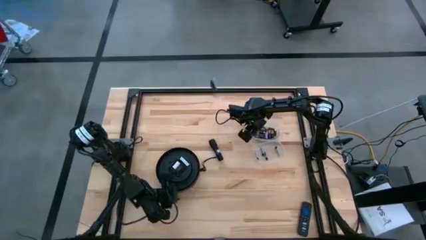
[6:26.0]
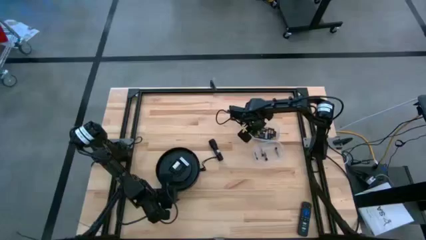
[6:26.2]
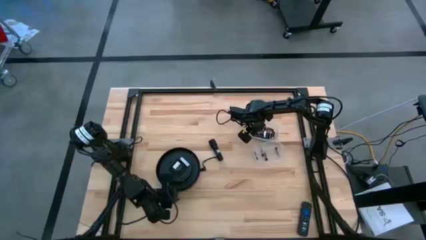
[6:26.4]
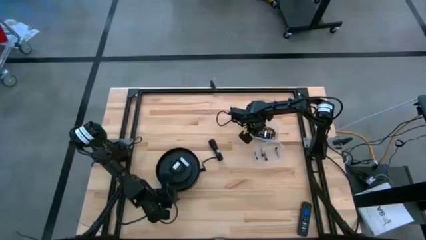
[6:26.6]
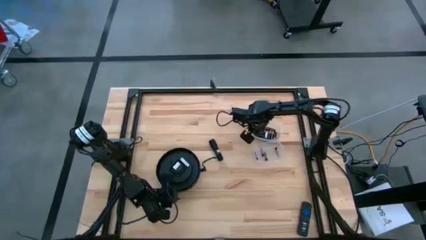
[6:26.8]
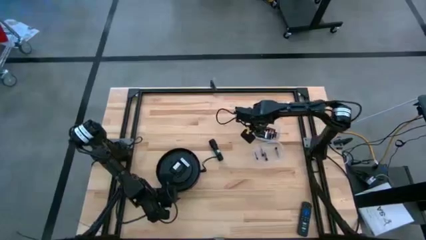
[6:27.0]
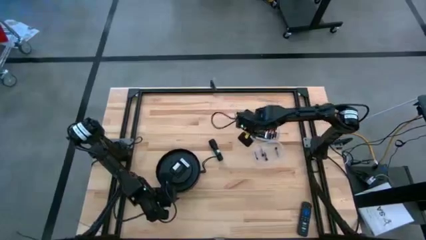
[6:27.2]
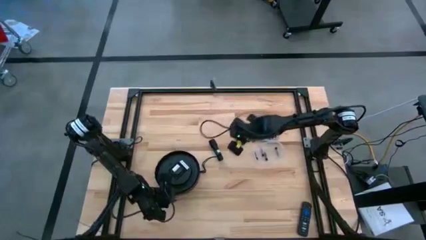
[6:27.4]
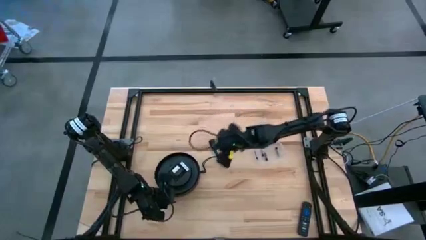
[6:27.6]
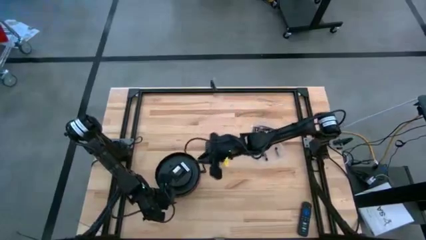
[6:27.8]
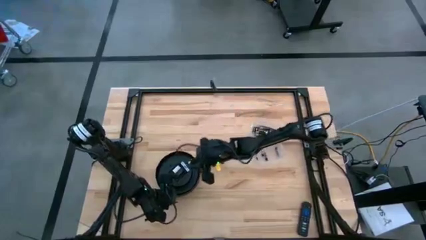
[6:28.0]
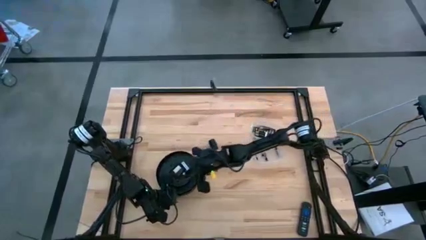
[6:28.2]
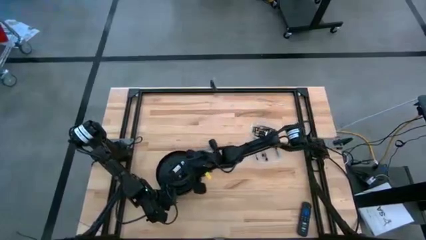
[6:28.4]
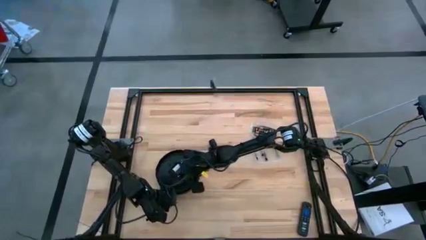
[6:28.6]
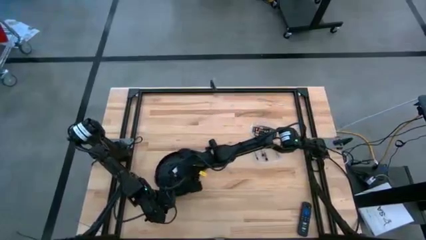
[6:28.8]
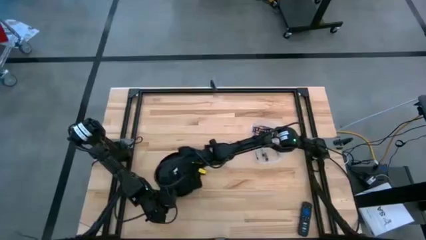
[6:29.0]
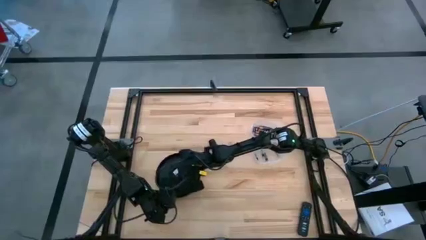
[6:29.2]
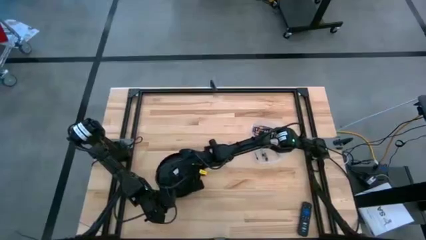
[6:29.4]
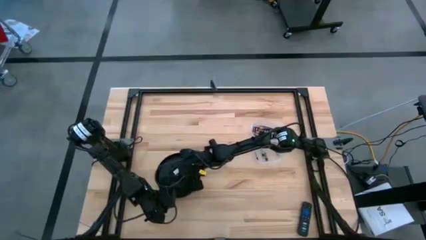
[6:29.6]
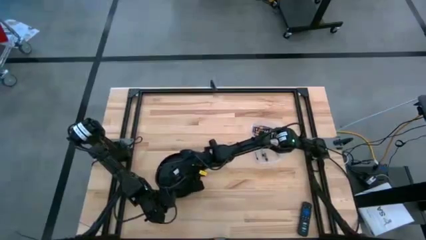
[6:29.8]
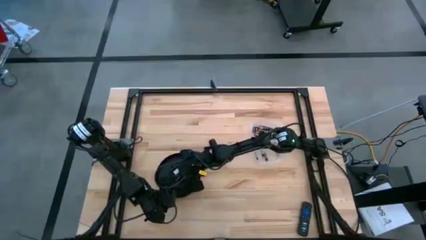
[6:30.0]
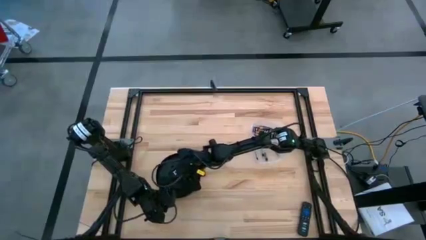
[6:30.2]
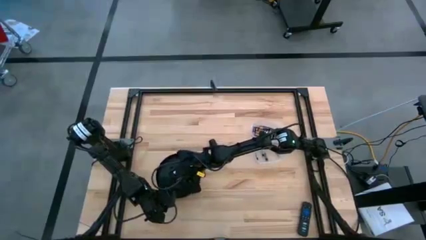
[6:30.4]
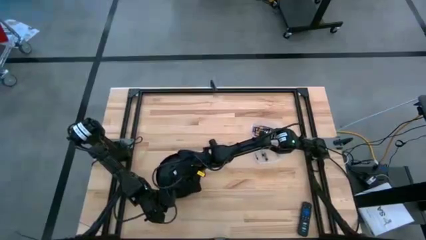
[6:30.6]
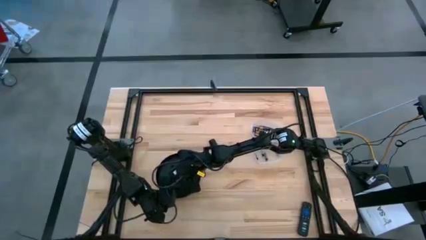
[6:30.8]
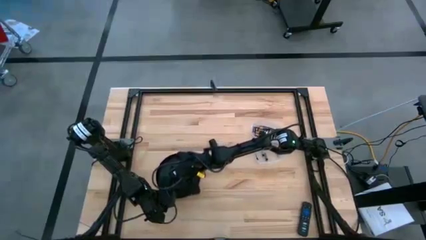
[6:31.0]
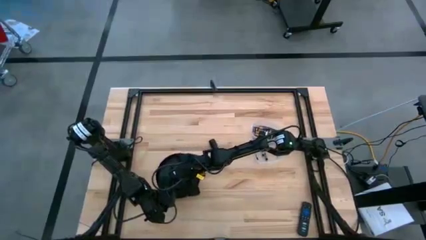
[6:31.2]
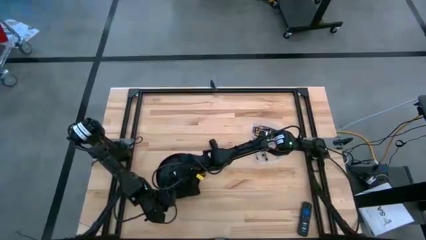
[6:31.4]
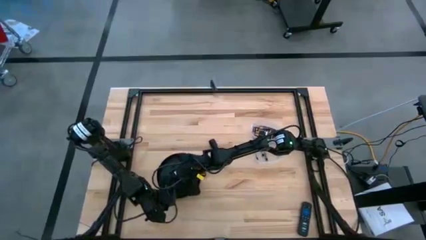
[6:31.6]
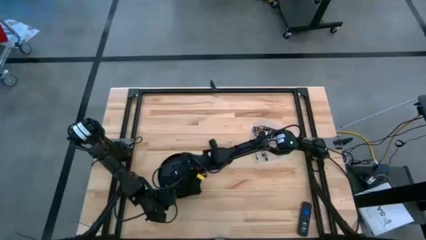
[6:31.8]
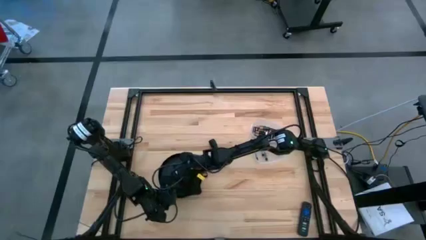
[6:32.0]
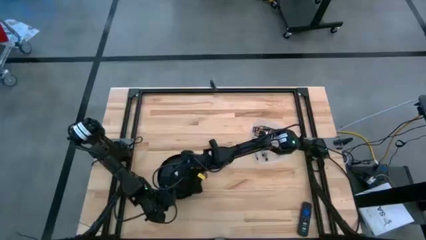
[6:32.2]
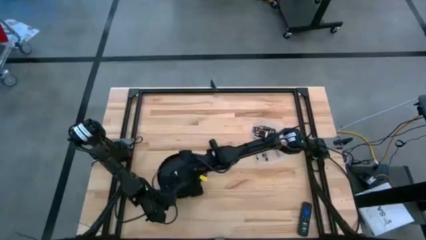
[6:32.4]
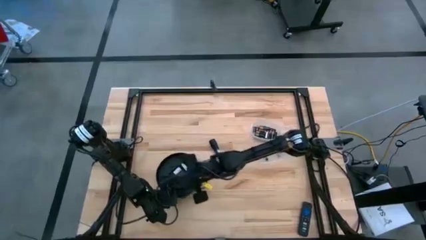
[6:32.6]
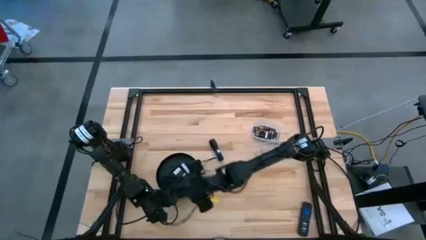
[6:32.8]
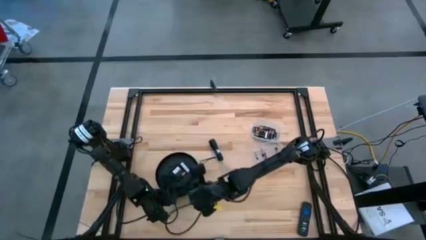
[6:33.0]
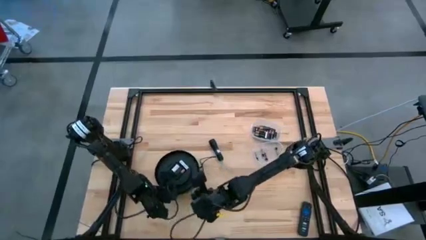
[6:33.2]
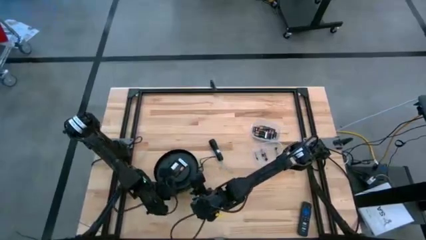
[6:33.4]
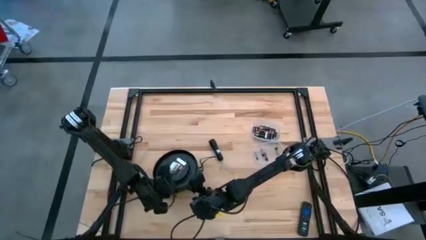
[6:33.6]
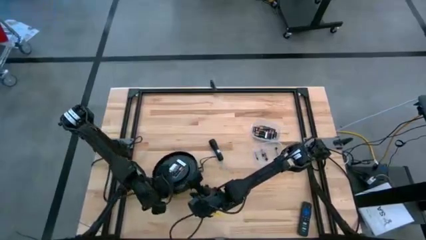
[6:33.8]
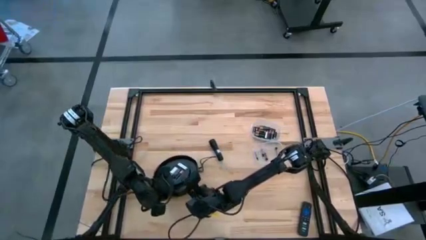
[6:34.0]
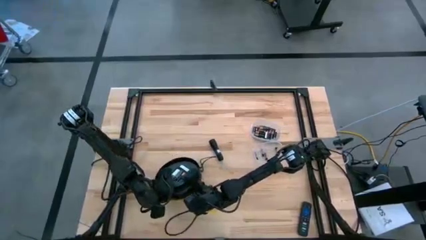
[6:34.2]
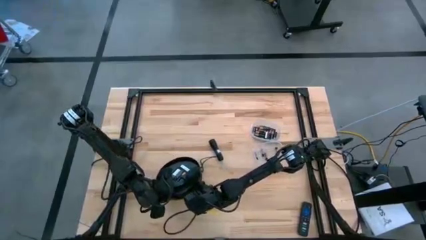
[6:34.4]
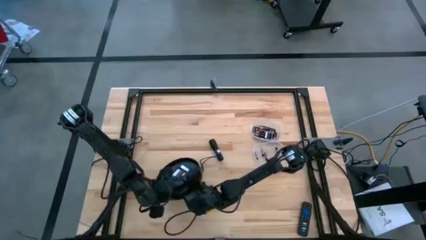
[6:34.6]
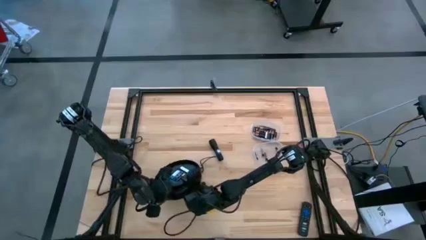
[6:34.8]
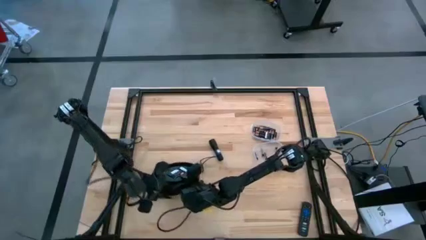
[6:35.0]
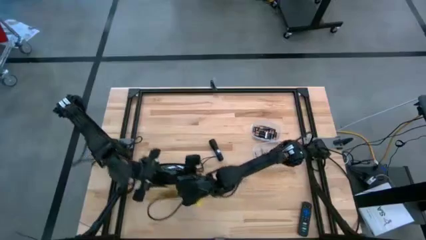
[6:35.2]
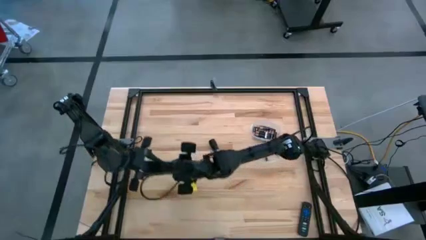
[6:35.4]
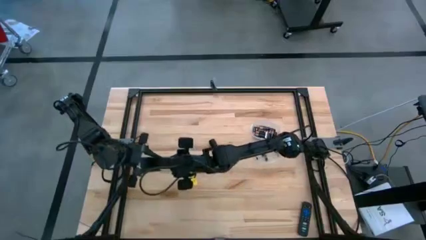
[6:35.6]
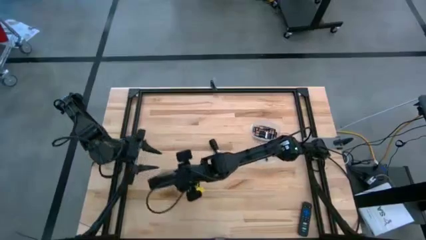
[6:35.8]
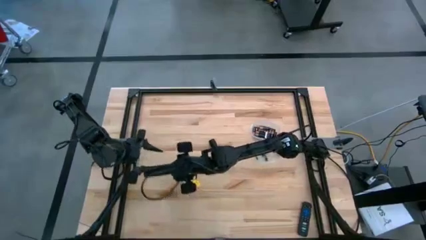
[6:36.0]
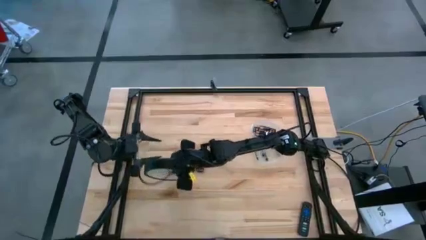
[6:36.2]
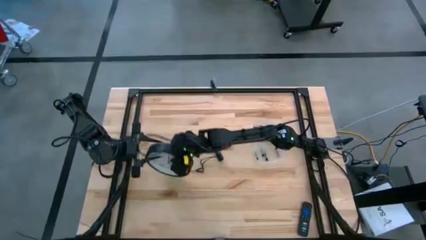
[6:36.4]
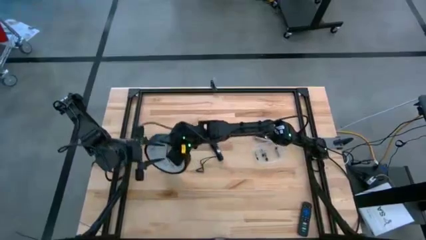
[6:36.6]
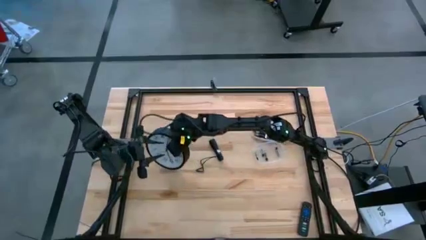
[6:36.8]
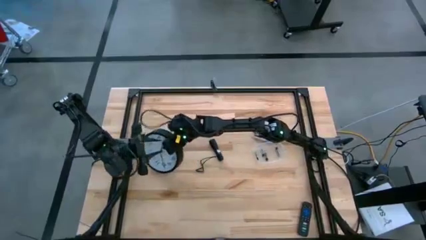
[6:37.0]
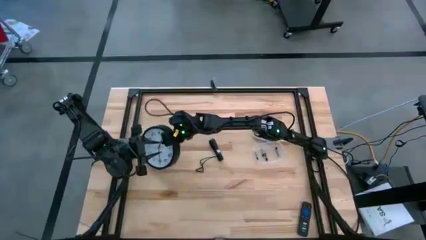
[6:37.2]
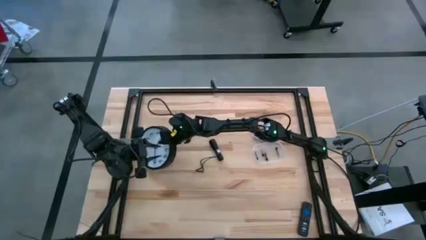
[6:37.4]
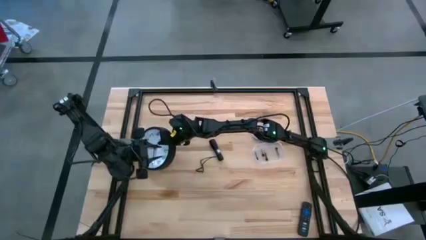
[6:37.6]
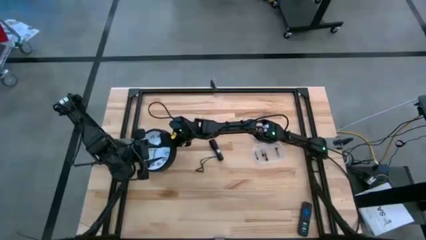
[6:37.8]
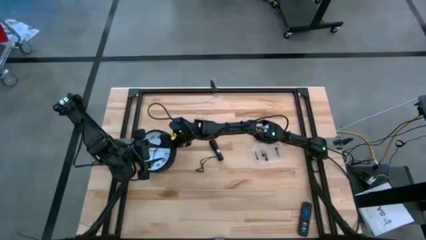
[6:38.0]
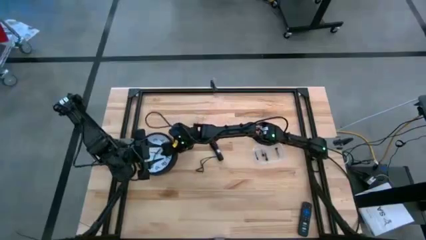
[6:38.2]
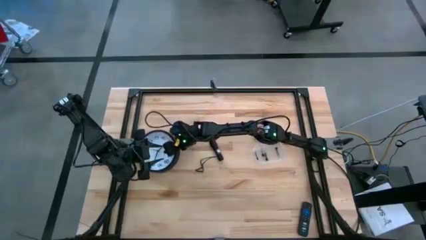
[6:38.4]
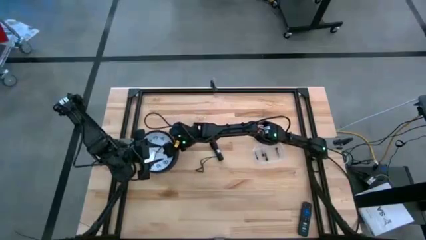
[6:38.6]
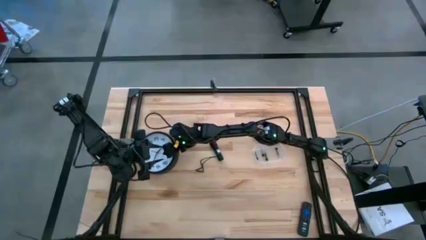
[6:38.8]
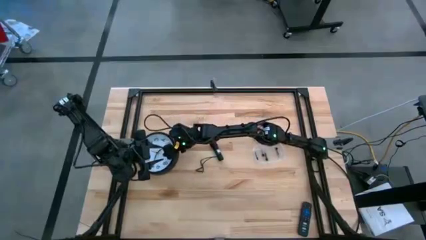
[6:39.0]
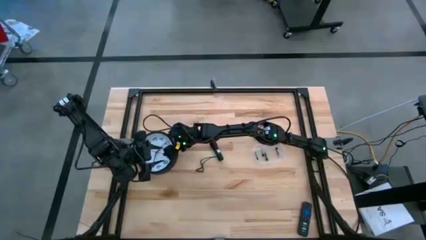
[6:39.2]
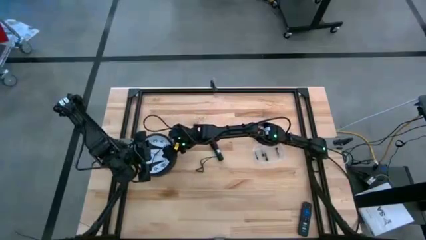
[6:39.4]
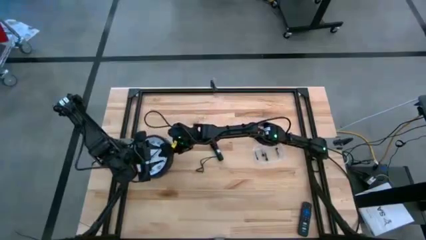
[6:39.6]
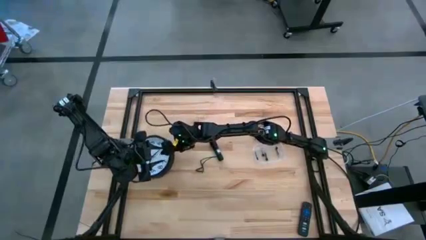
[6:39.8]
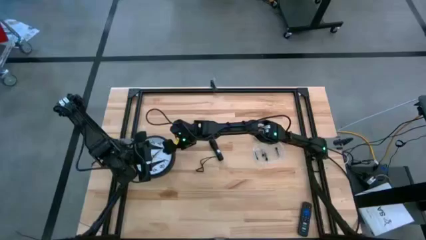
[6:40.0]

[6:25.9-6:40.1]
Task: Insert battery
Insert the black battery into the clock battery compartment

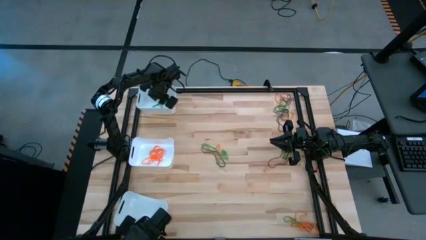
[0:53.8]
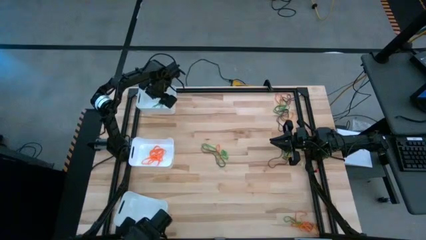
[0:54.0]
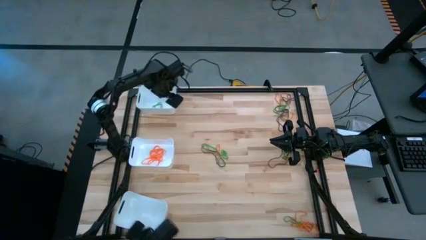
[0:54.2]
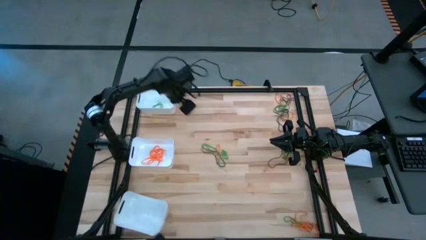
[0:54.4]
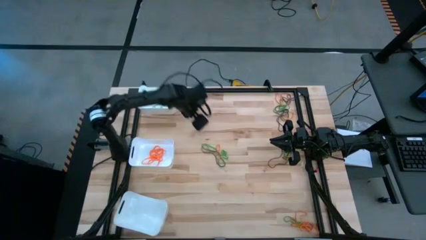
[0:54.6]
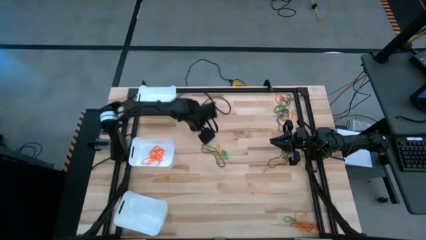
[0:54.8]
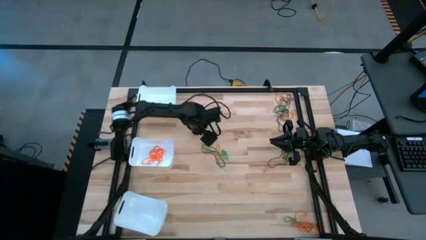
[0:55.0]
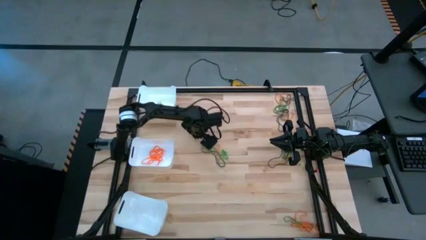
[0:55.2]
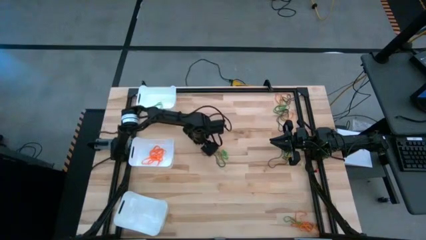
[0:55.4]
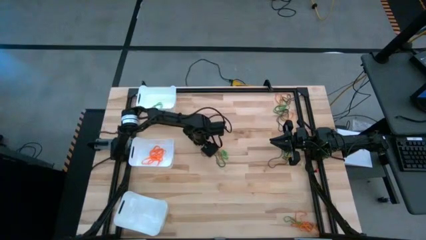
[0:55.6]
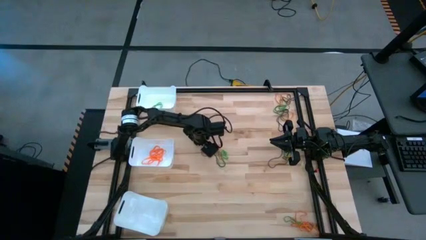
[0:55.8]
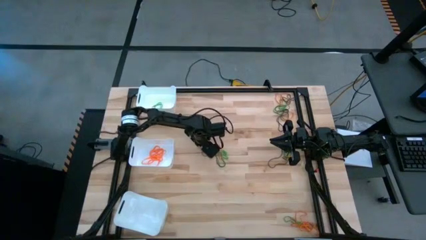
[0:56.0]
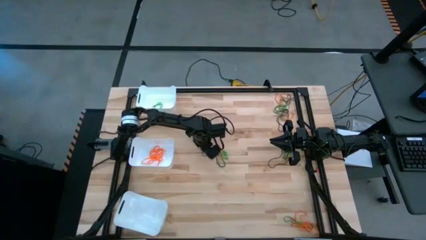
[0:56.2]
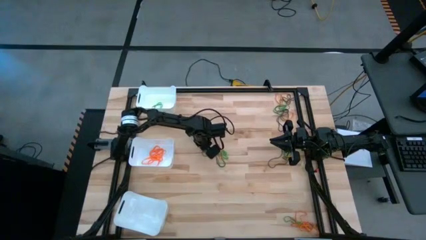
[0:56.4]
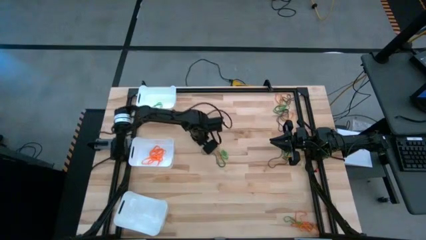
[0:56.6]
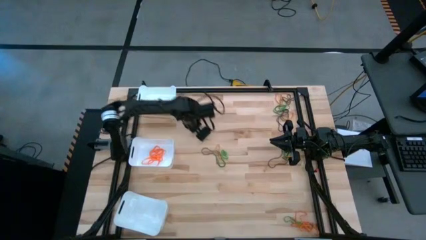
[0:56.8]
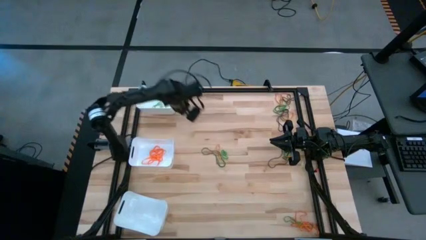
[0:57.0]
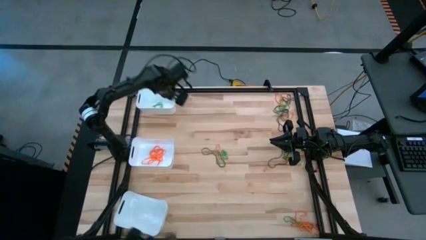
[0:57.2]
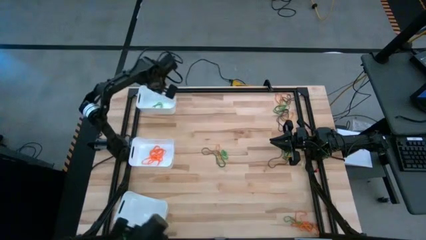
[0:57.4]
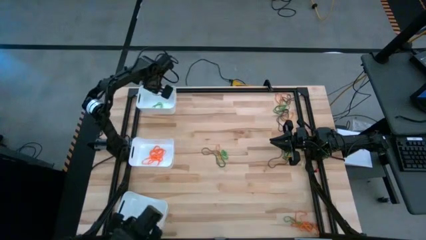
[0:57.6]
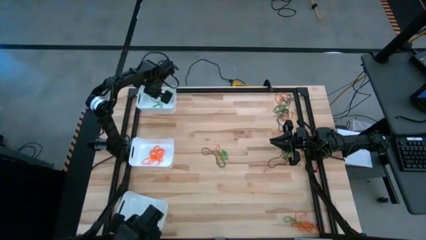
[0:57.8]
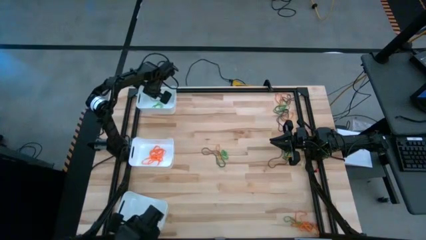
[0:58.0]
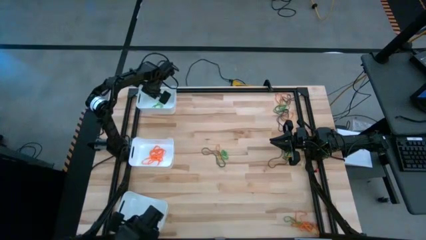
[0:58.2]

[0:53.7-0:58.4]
Task: Sort rubber bands into baskets
Put the green rubber band into the top white bin
